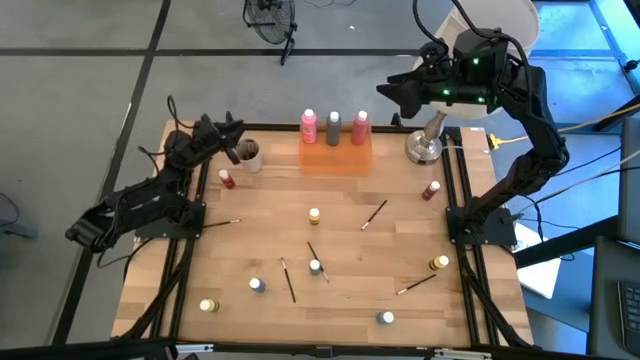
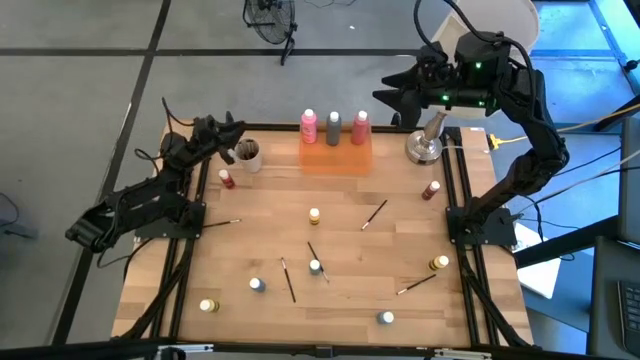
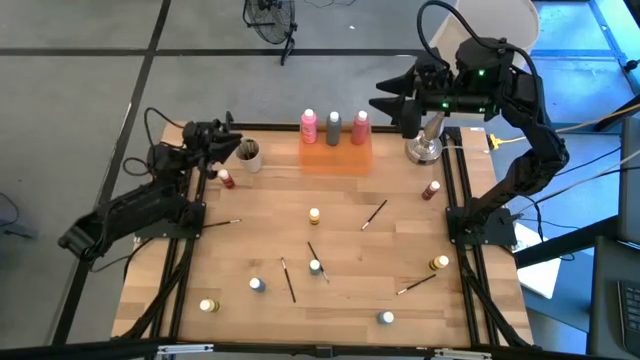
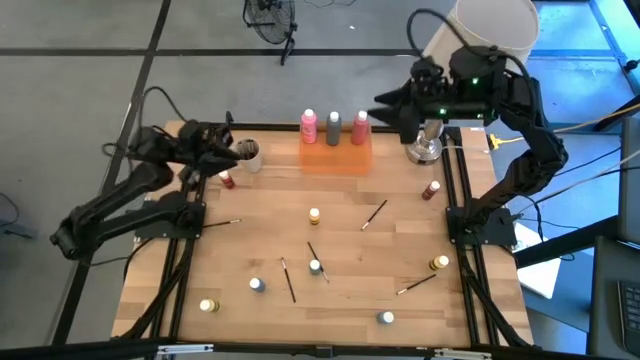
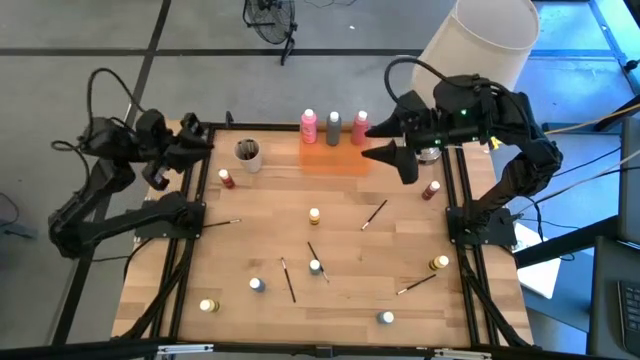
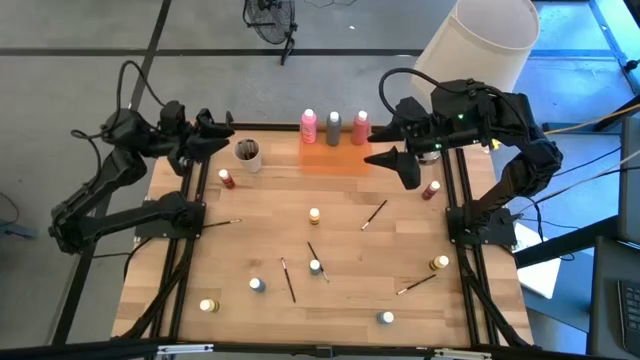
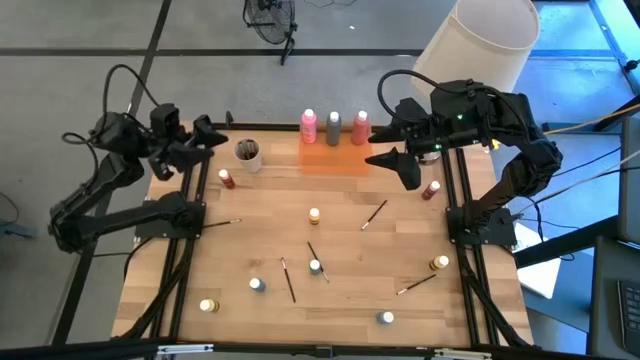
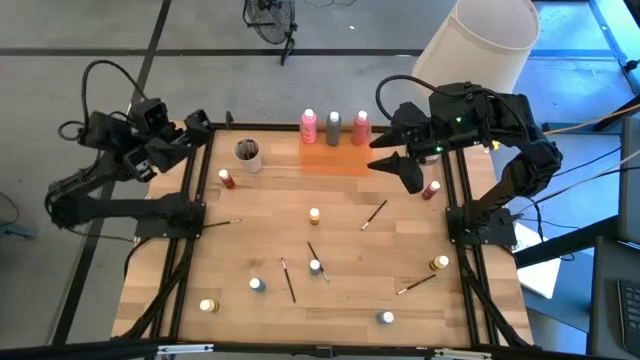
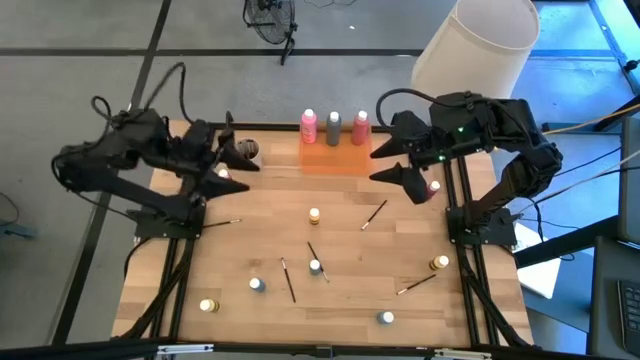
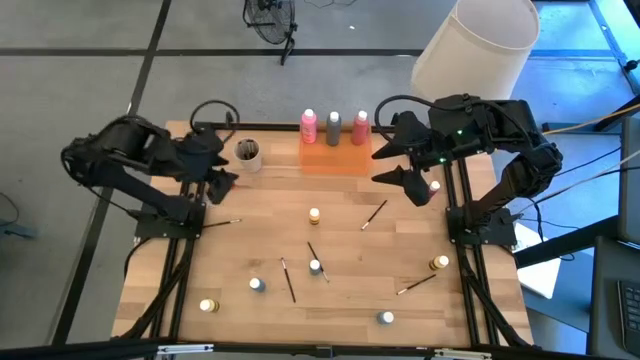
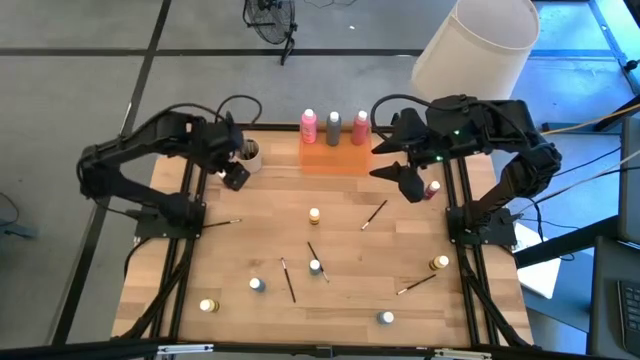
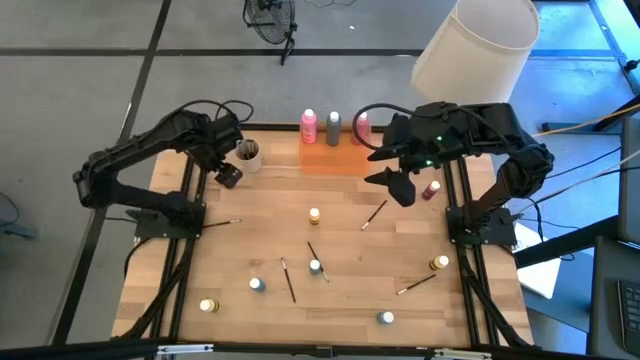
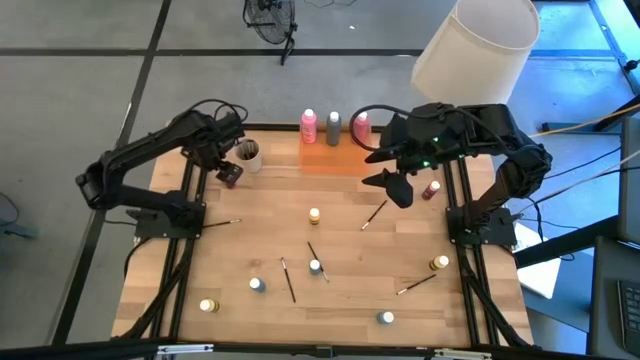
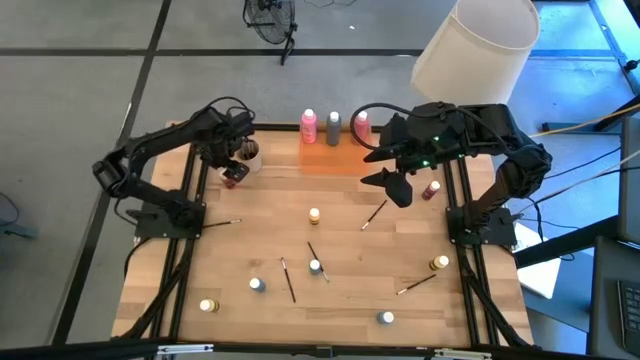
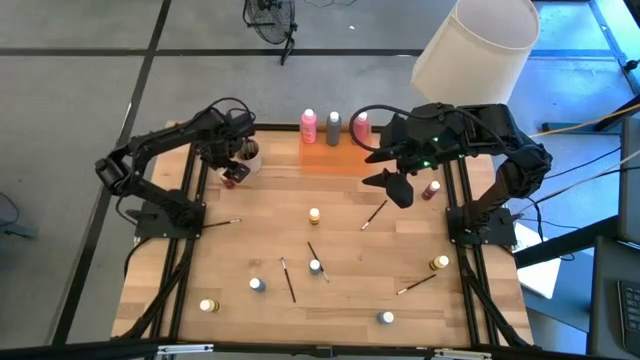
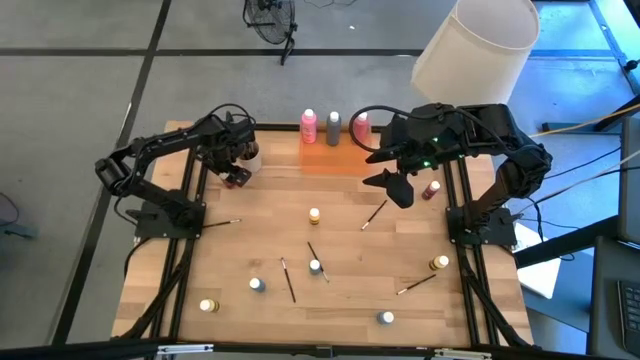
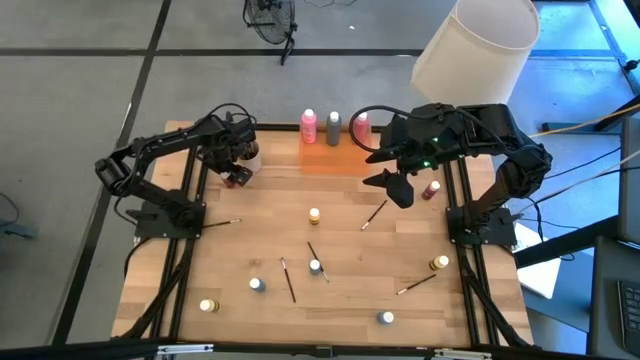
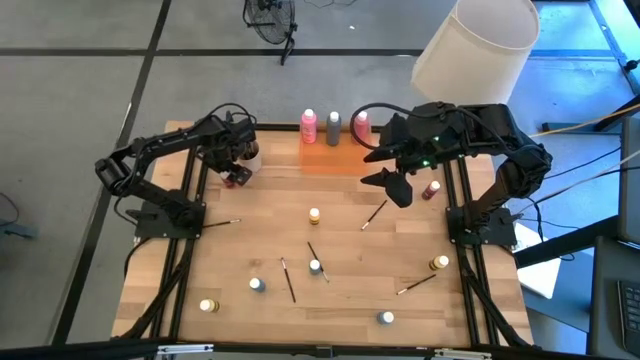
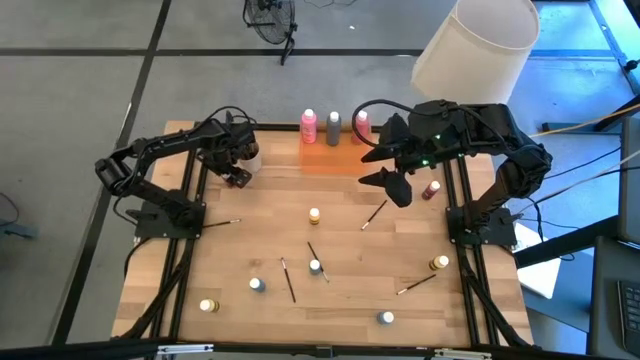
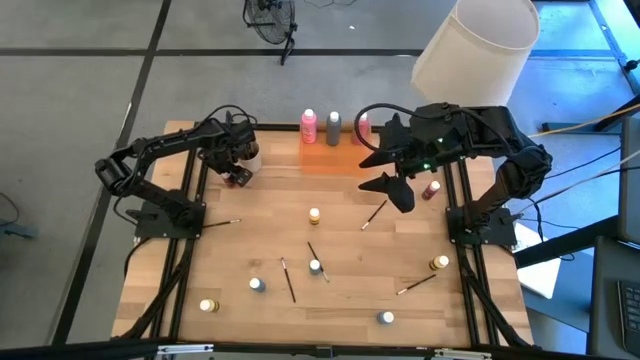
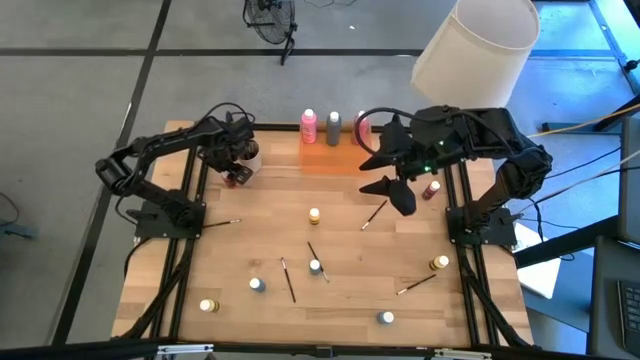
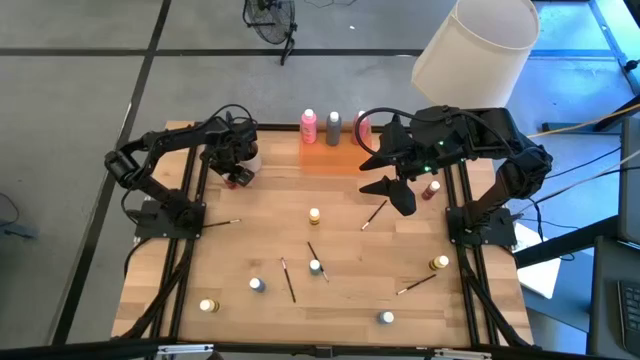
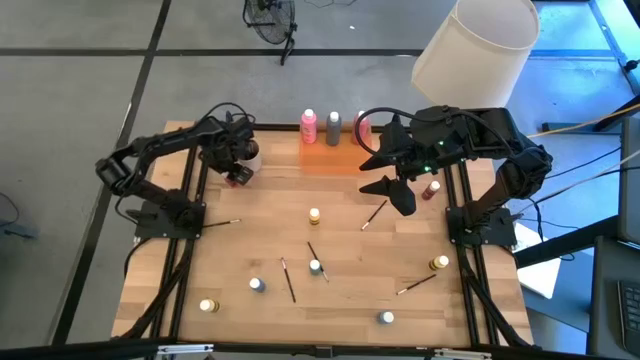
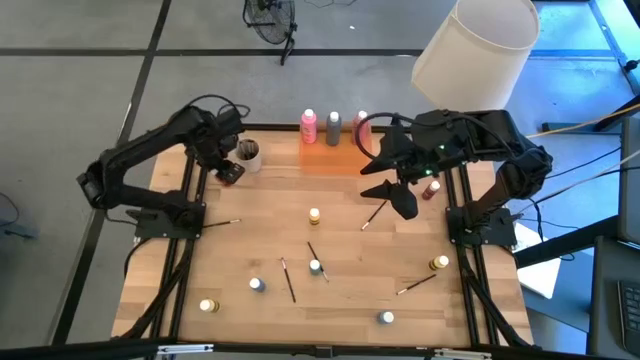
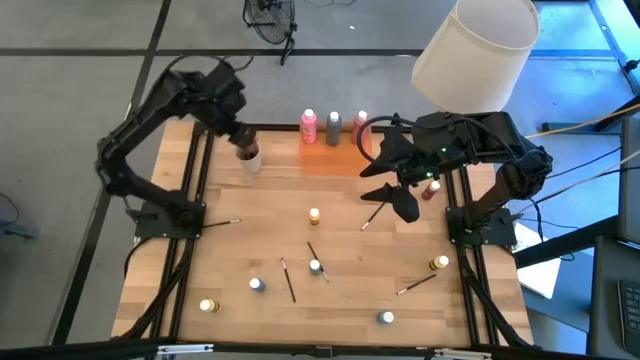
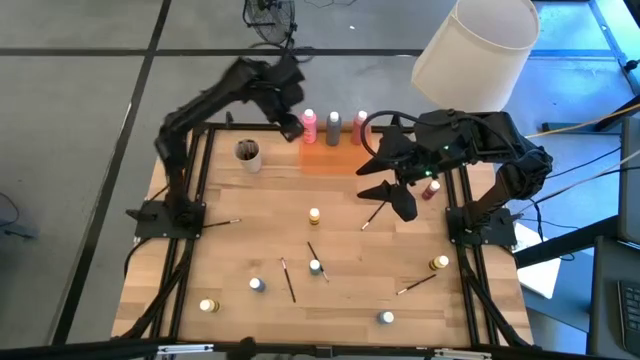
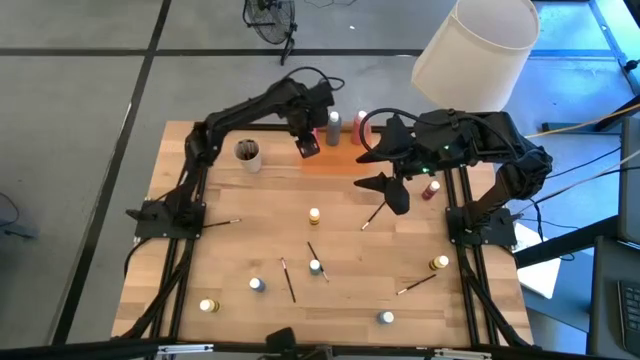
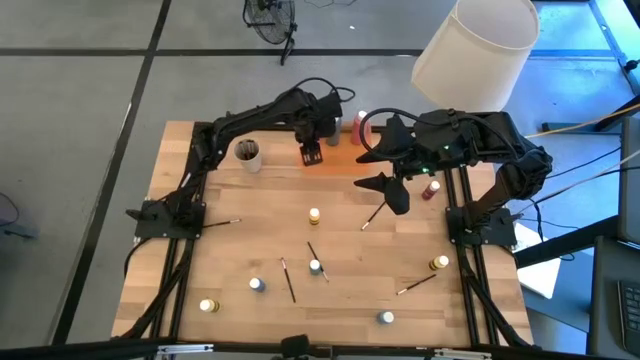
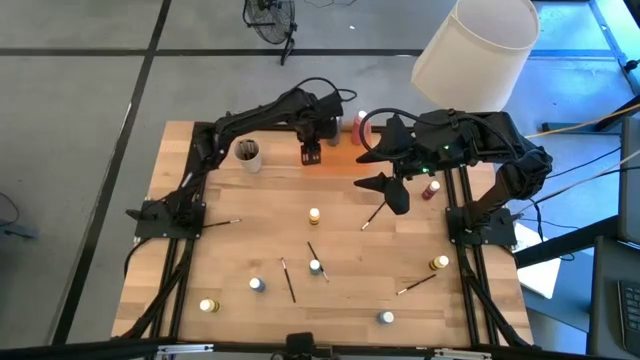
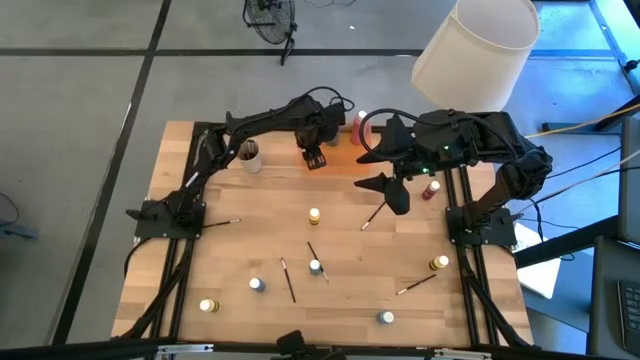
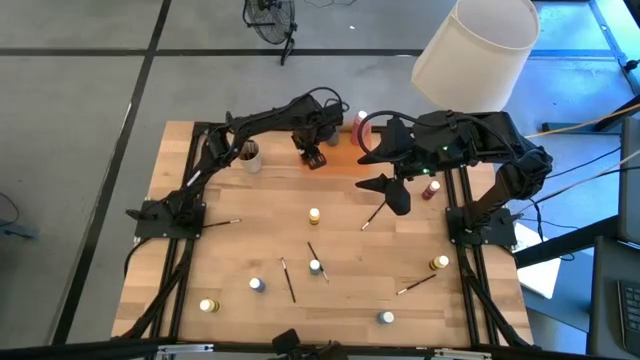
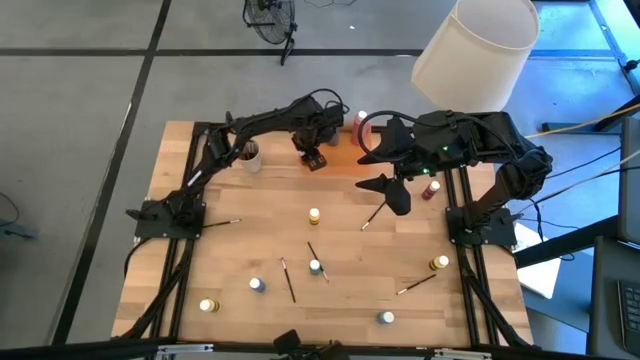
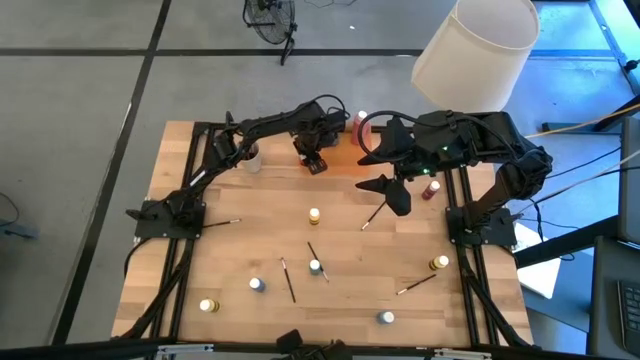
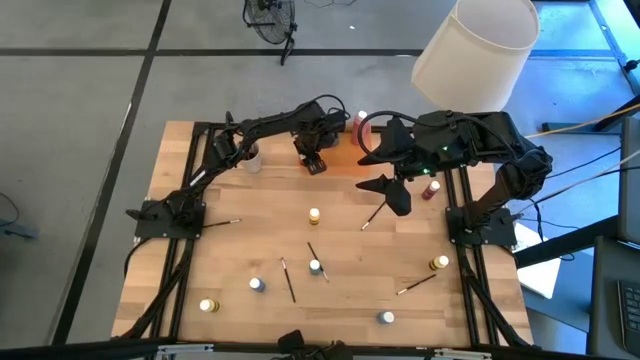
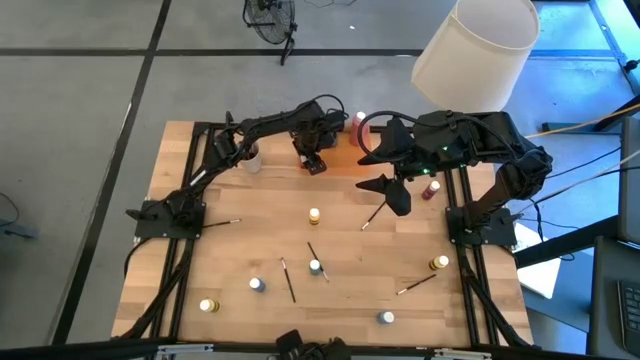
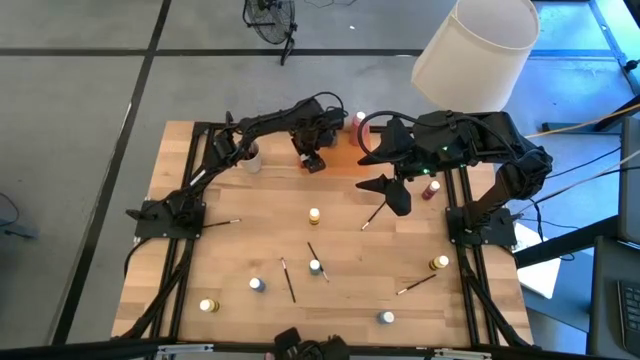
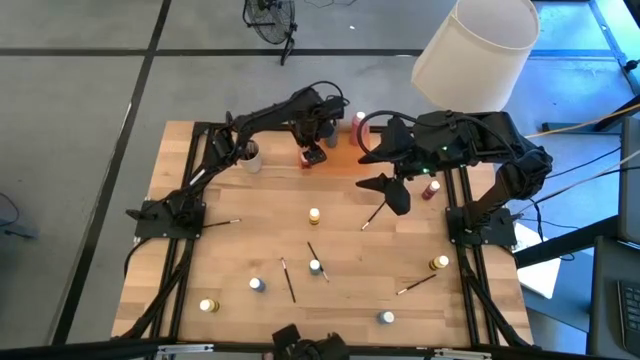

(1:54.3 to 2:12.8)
Task: Pick & Place Paint Supplies
Put the red paint bottle into the orange bin
